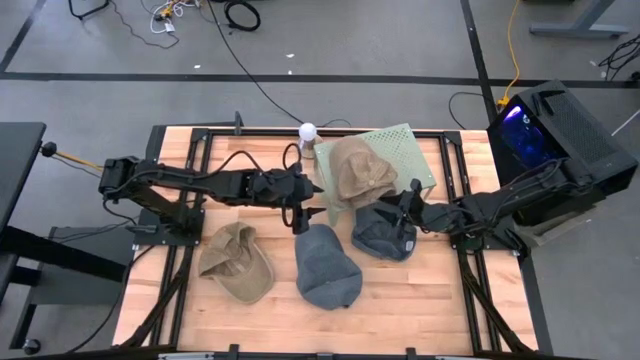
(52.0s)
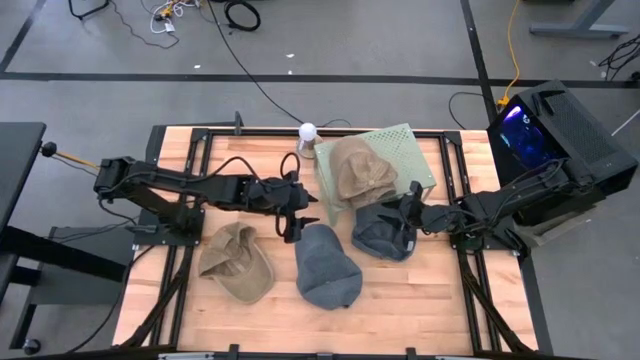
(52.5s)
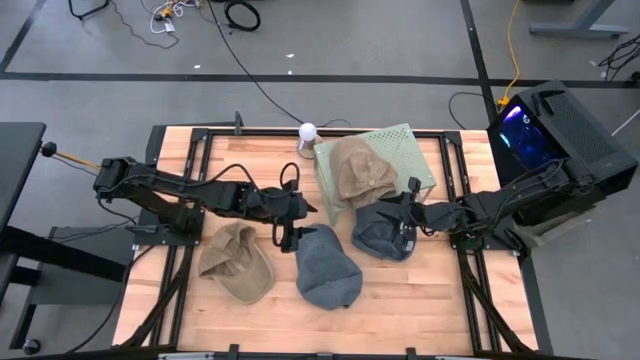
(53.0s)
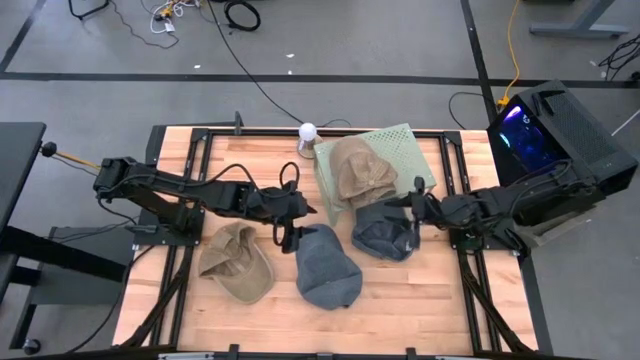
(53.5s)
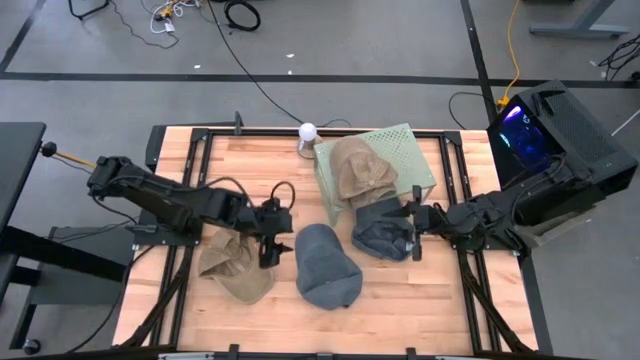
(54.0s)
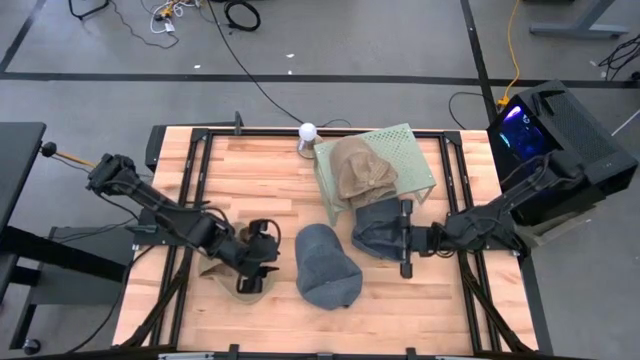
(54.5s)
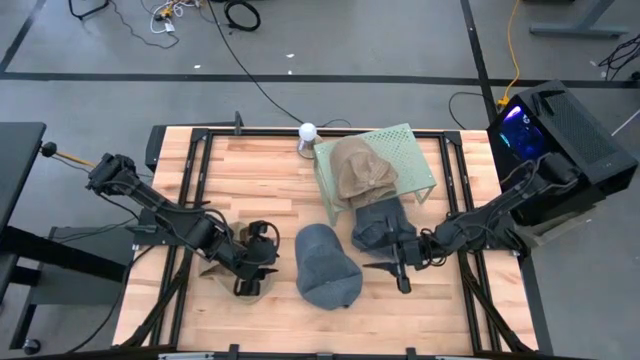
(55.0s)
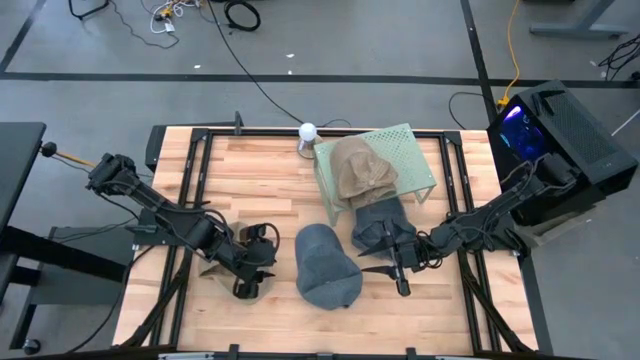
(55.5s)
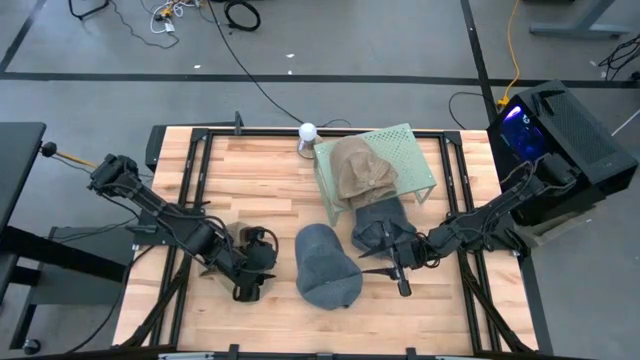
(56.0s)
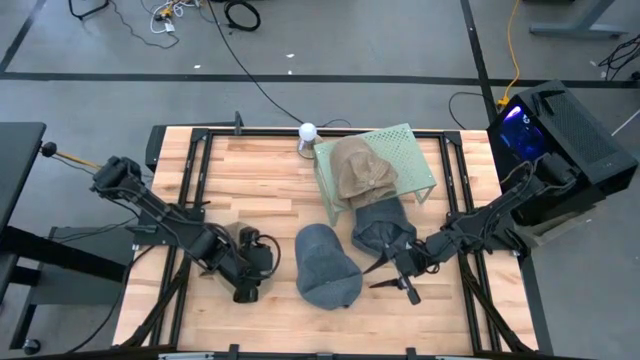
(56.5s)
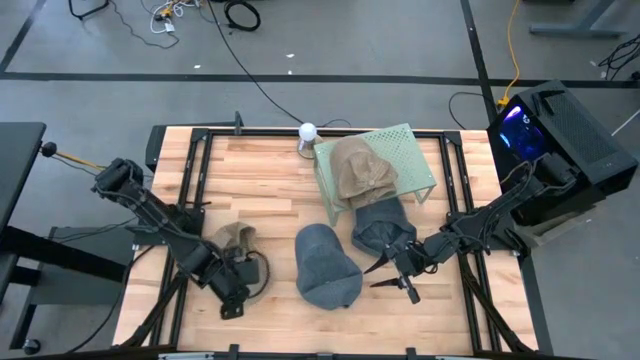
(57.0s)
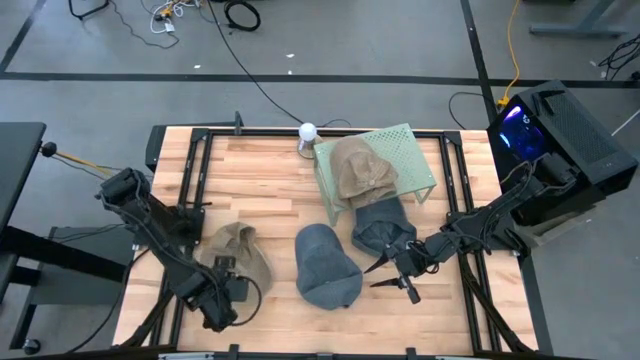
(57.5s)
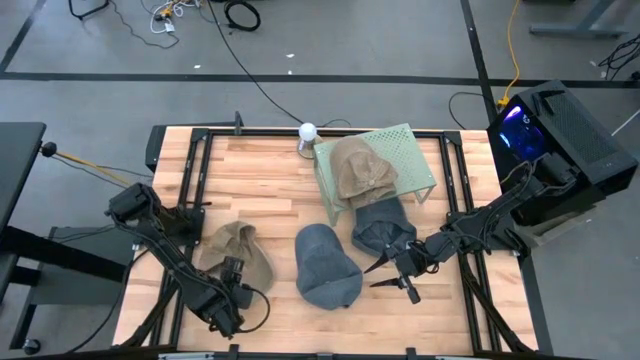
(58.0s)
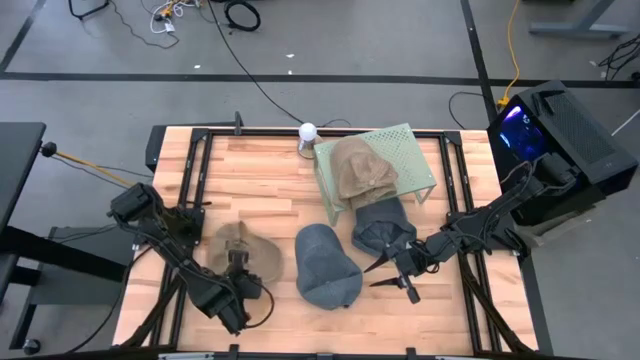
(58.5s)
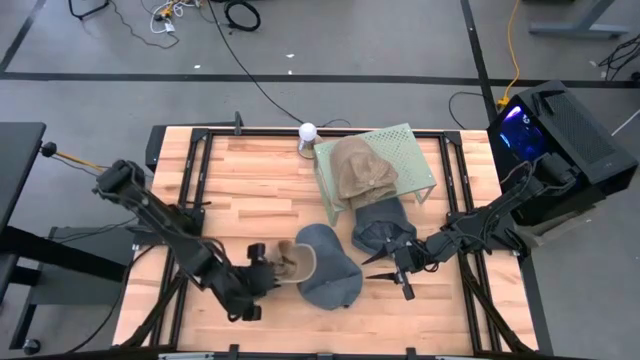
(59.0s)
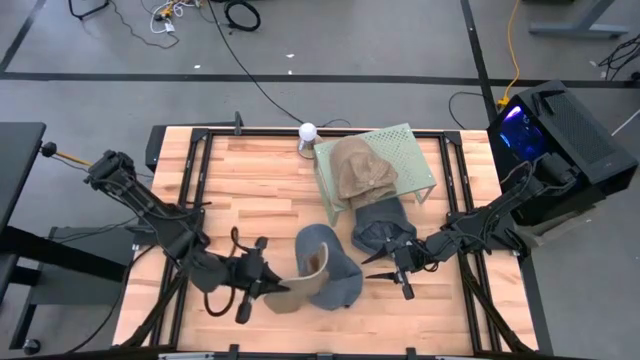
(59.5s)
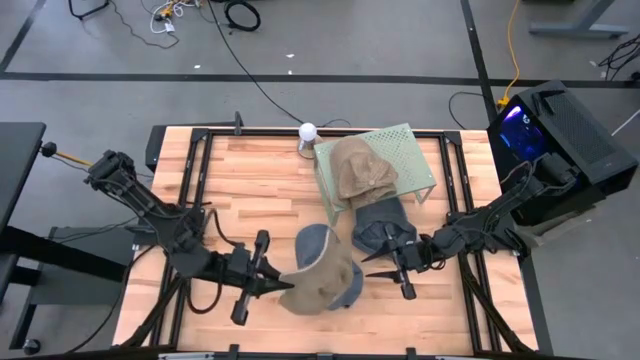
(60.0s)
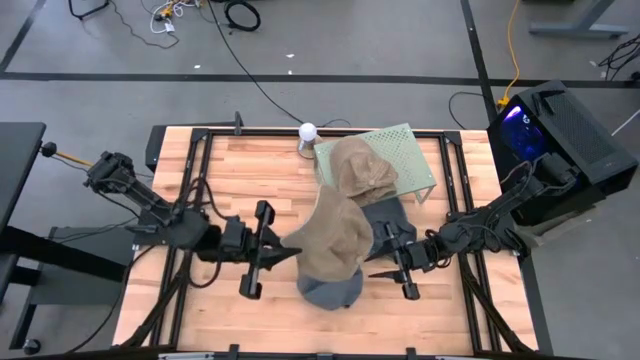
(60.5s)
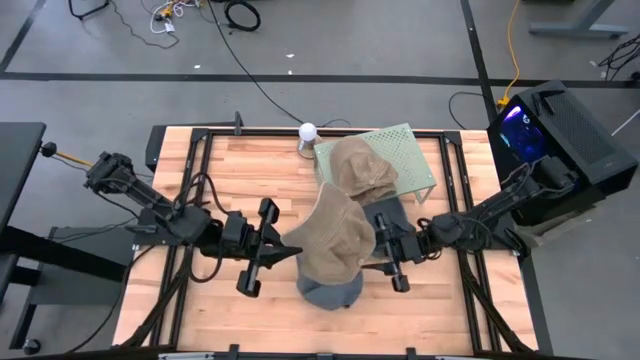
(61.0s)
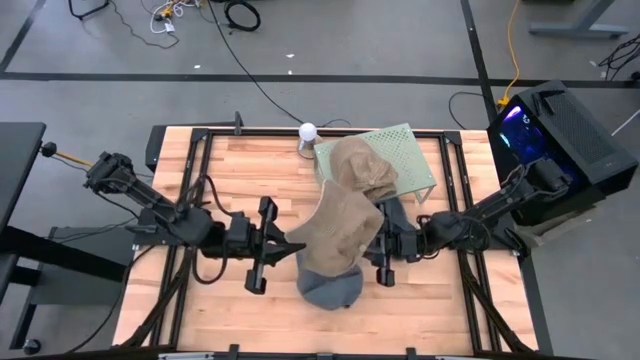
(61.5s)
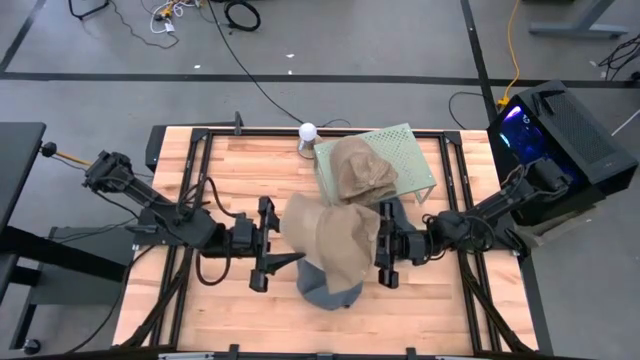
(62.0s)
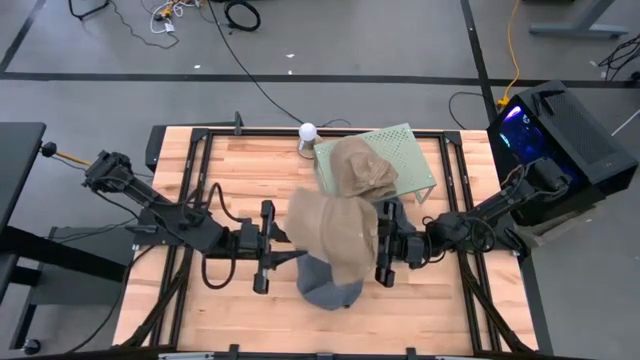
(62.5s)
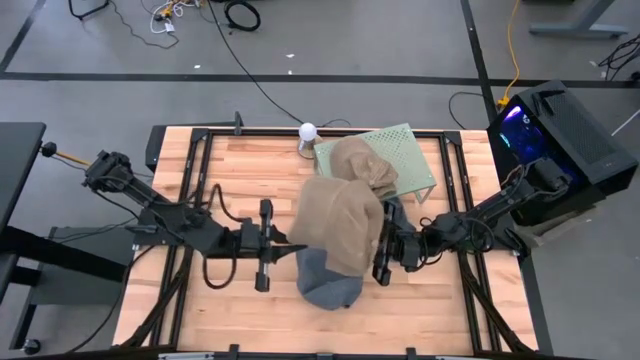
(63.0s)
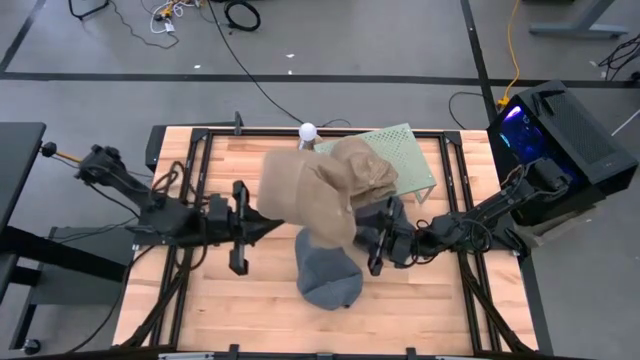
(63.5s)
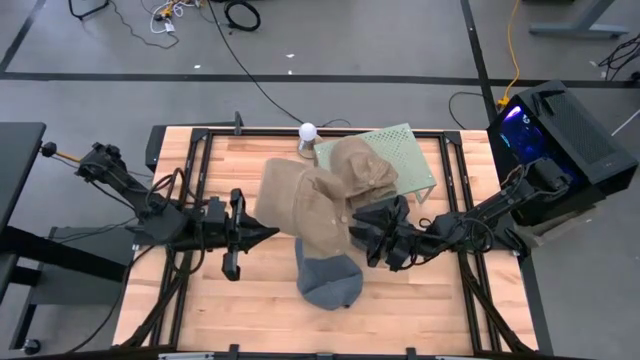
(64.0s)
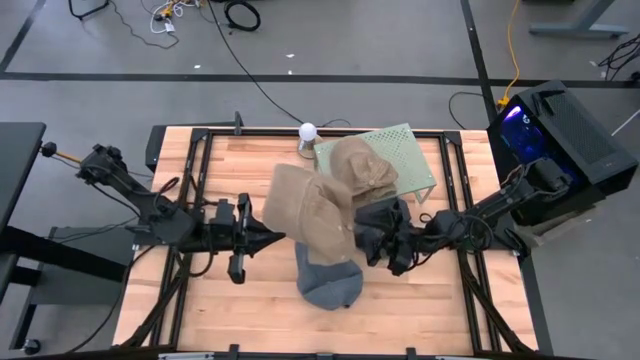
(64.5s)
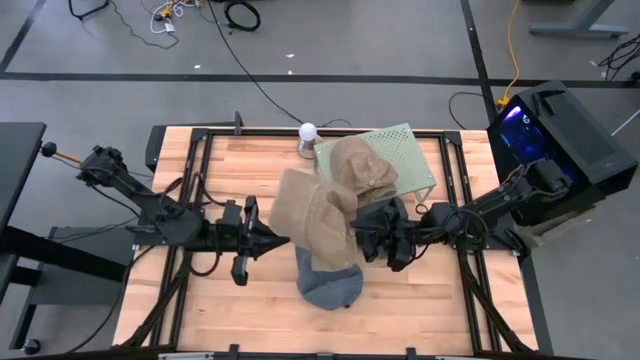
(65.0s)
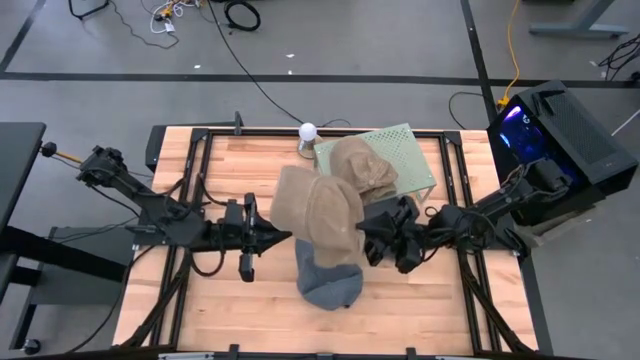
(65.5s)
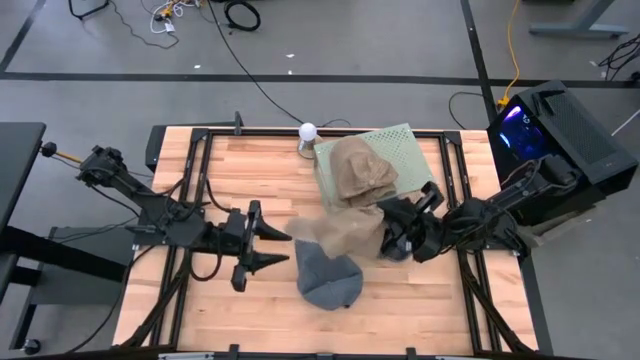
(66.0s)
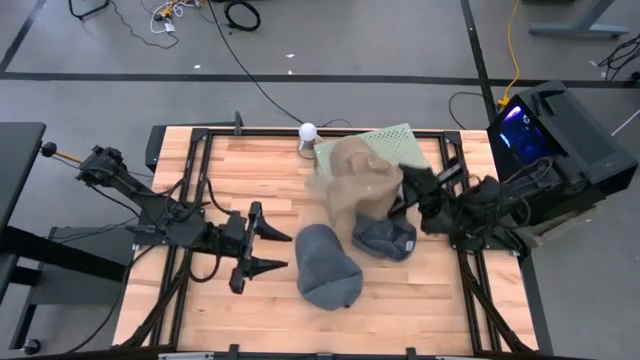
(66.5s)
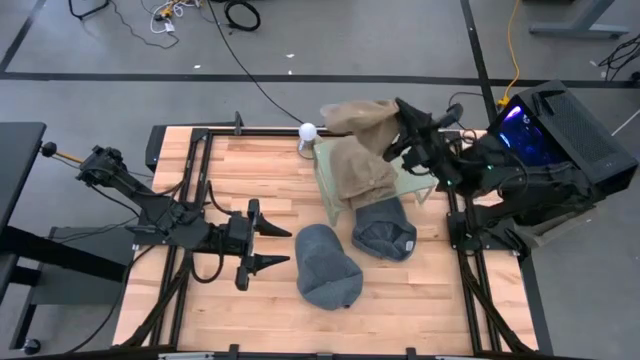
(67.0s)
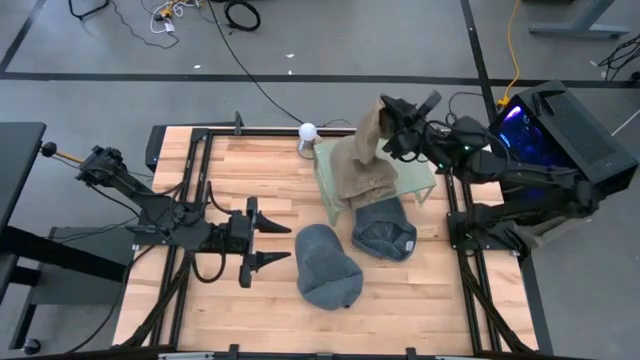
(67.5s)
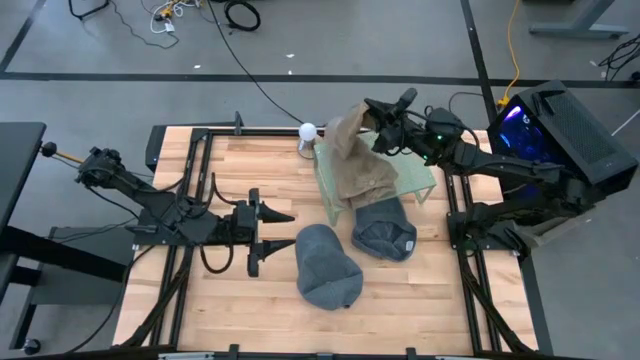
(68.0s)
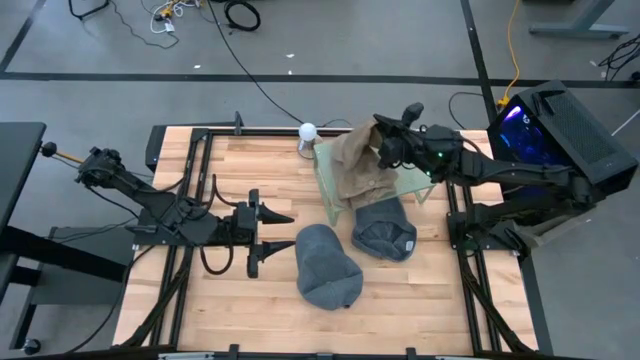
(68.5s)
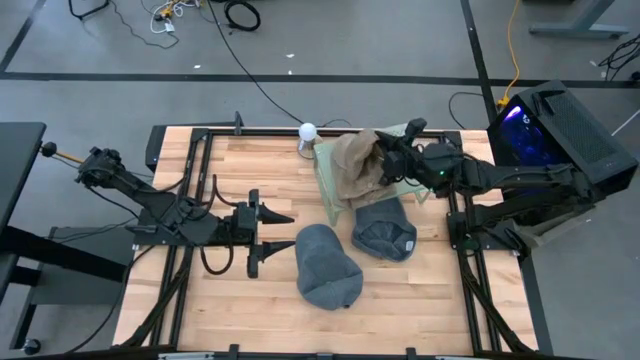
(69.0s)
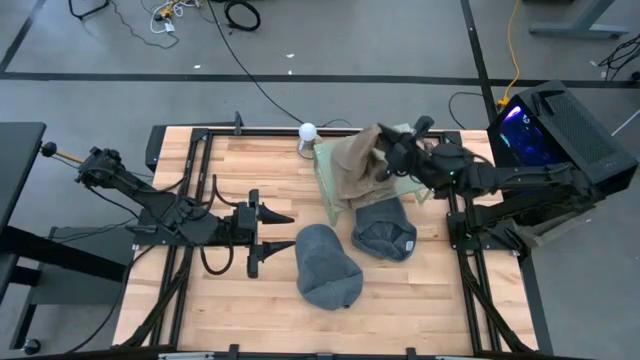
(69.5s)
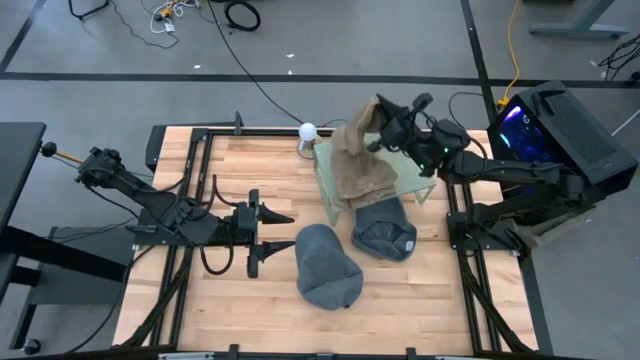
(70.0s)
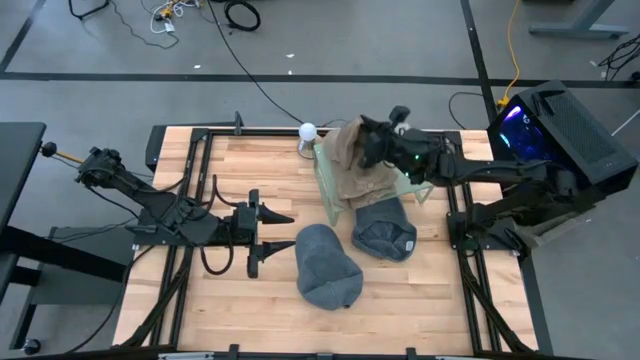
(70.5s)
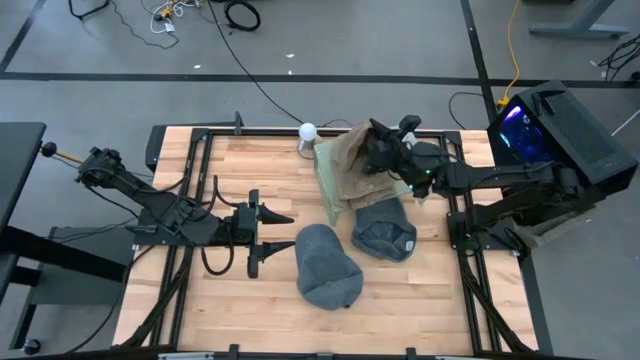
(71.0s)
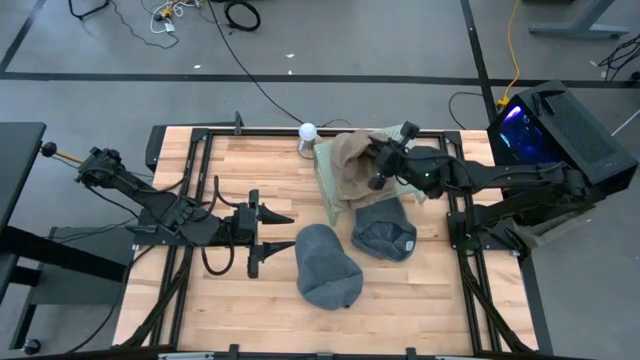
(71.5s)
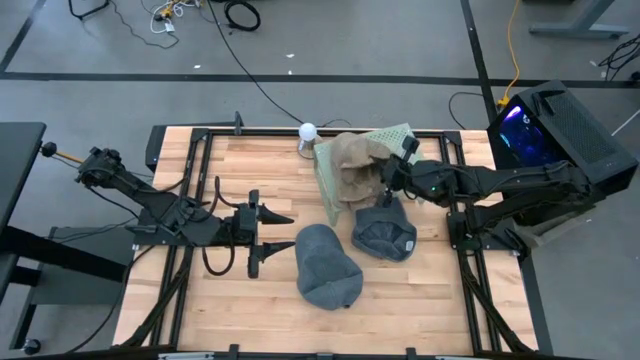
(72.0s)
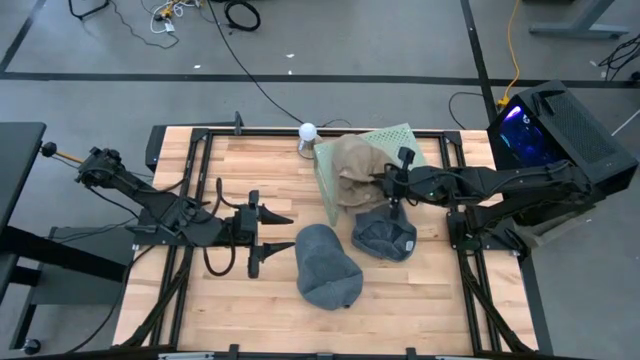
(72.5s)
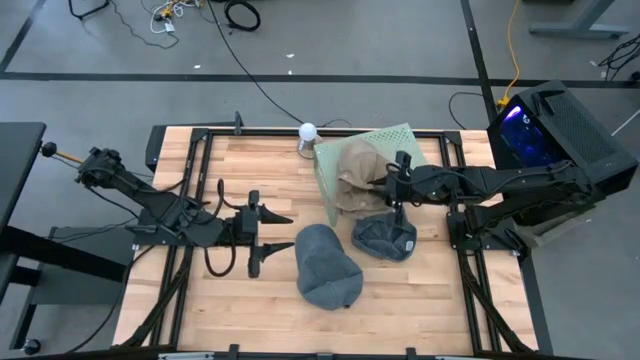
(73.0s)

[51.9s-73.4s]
Task: Stack caps on shelf
Stack the brown cap on the brown cap on the shelf

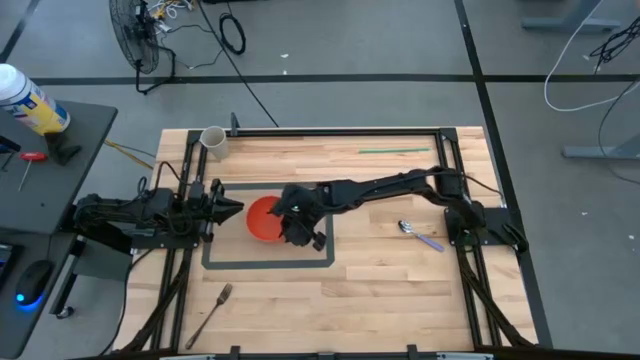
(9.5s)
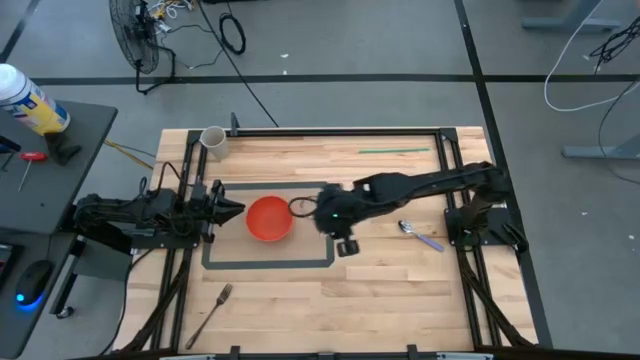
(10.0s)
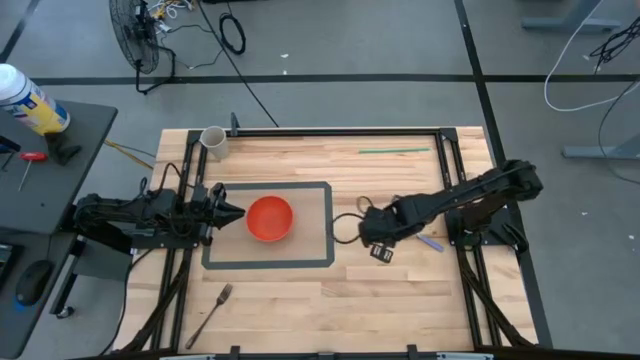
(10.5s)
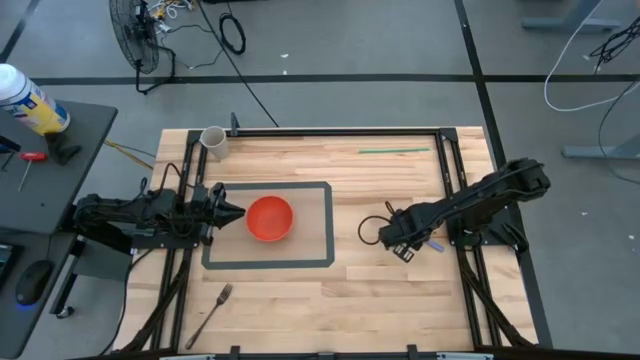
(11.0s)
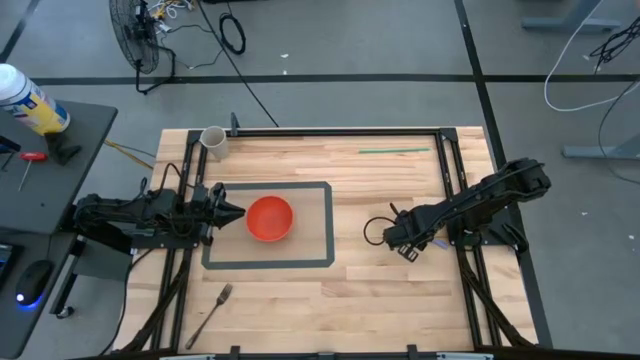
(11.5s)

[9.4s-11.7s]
Task: Pick & Place Utensil
Put the purple spoon into the orange bowl
